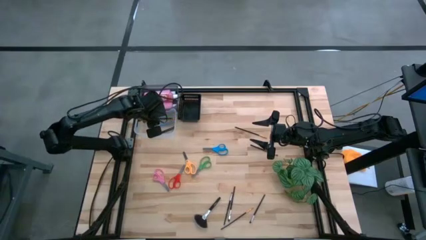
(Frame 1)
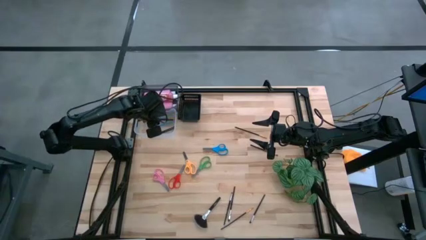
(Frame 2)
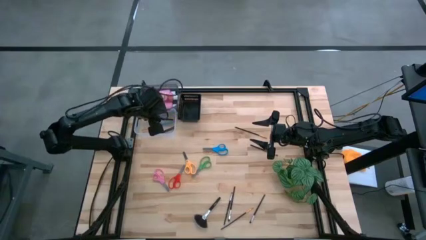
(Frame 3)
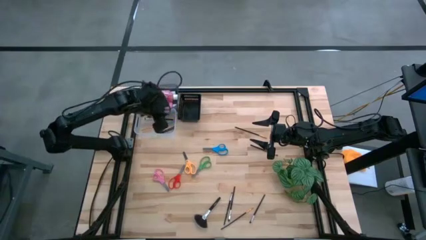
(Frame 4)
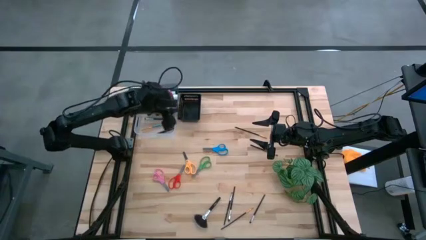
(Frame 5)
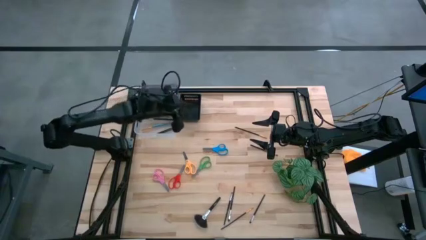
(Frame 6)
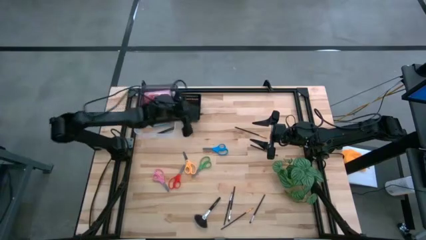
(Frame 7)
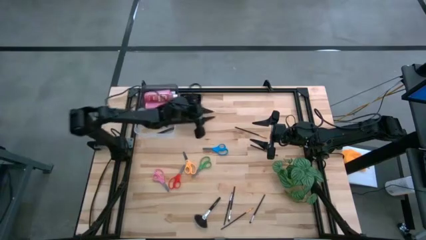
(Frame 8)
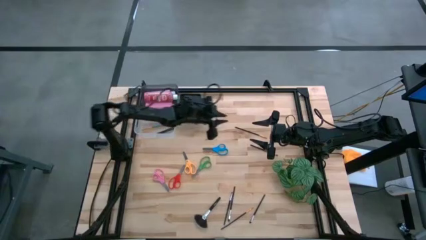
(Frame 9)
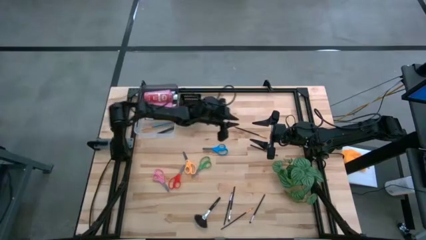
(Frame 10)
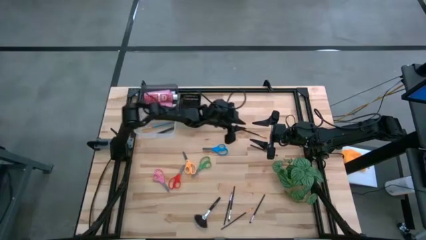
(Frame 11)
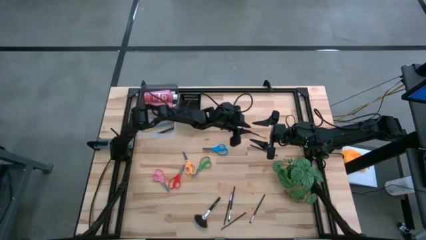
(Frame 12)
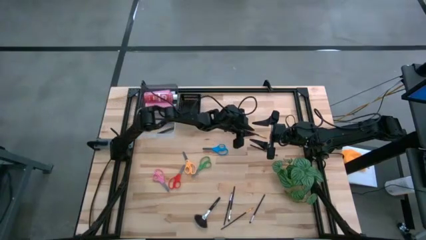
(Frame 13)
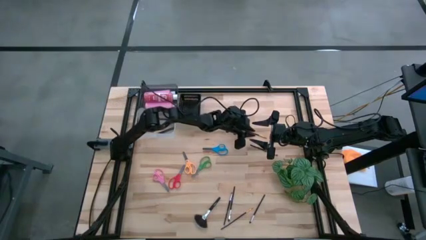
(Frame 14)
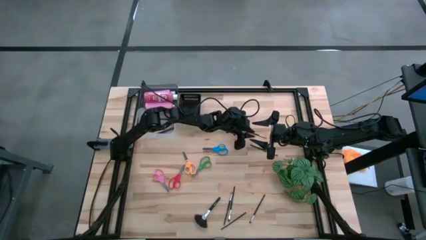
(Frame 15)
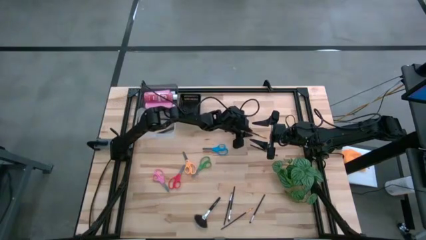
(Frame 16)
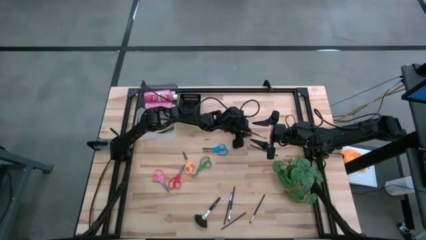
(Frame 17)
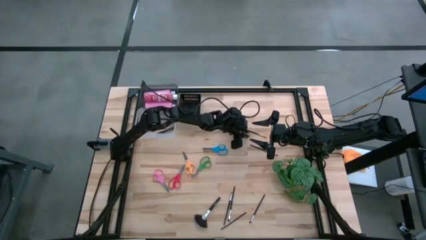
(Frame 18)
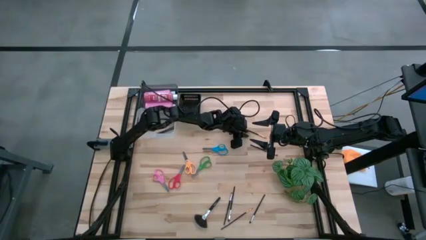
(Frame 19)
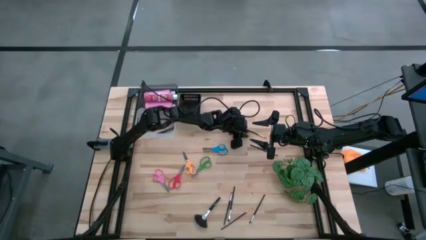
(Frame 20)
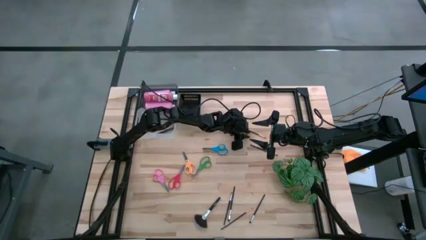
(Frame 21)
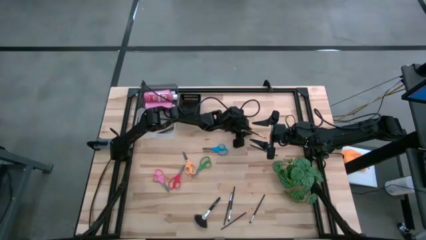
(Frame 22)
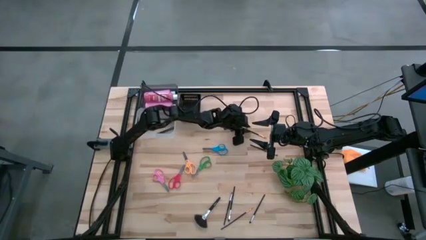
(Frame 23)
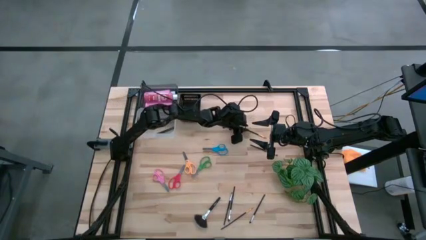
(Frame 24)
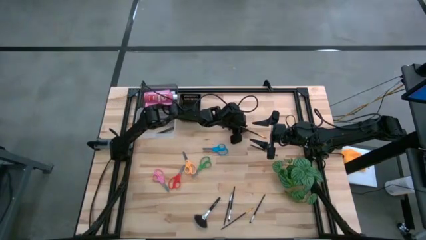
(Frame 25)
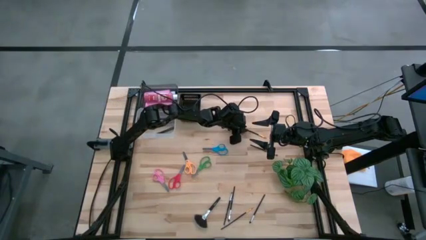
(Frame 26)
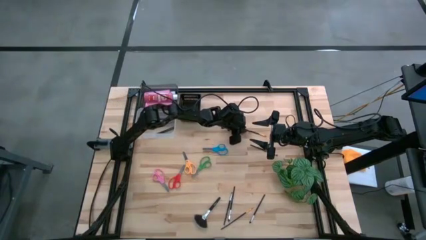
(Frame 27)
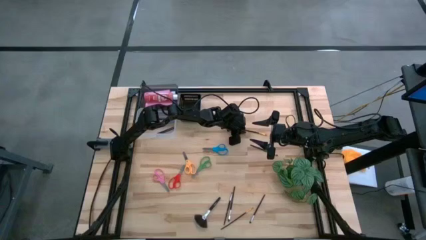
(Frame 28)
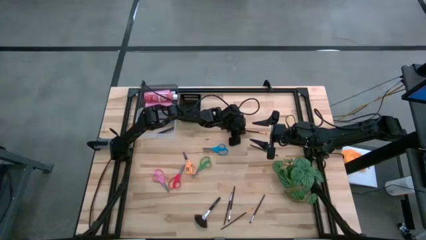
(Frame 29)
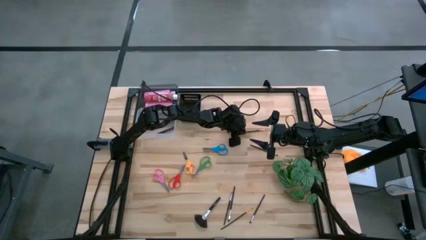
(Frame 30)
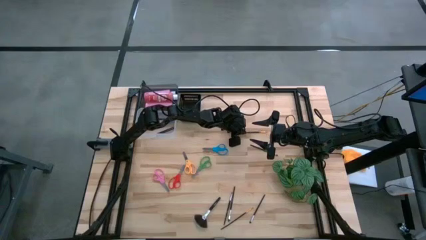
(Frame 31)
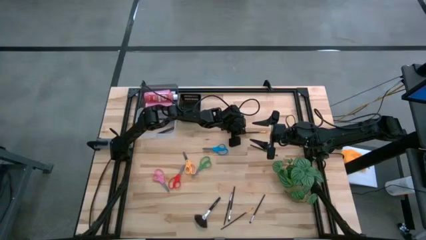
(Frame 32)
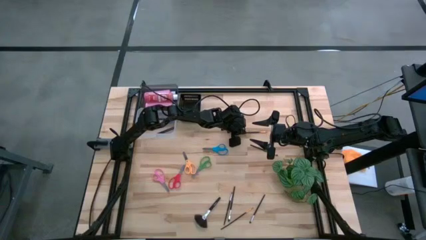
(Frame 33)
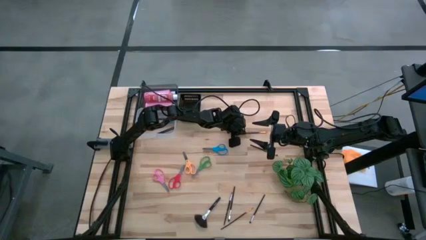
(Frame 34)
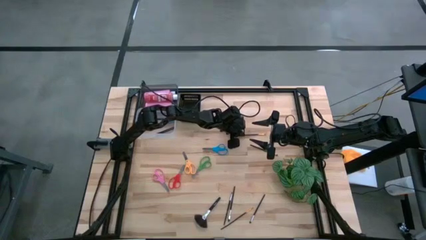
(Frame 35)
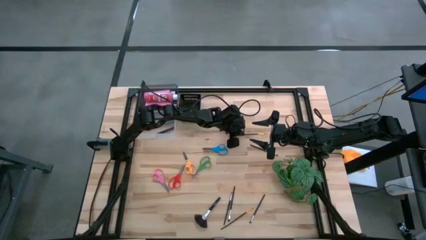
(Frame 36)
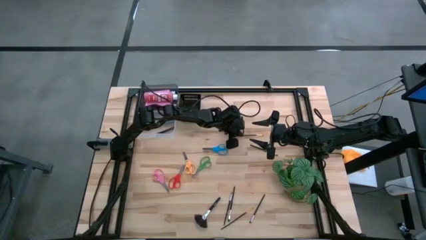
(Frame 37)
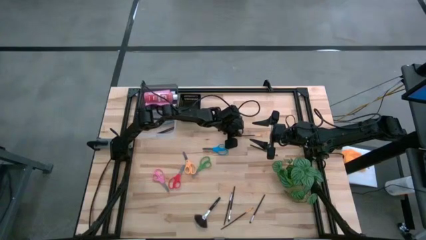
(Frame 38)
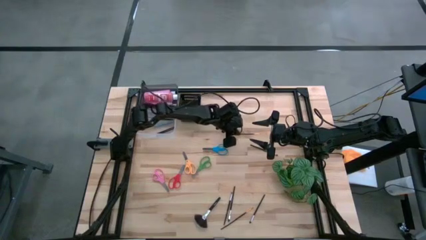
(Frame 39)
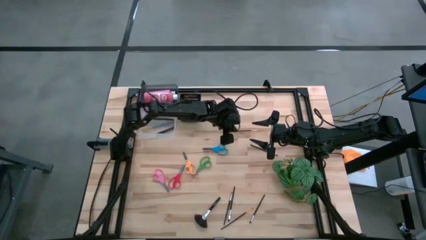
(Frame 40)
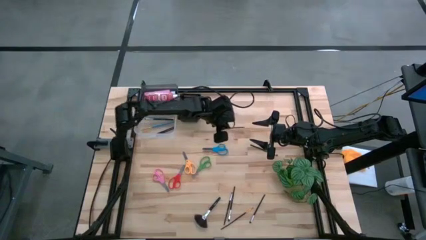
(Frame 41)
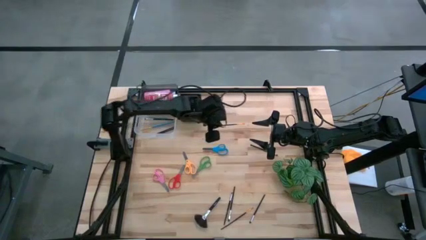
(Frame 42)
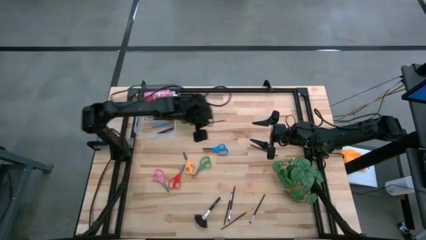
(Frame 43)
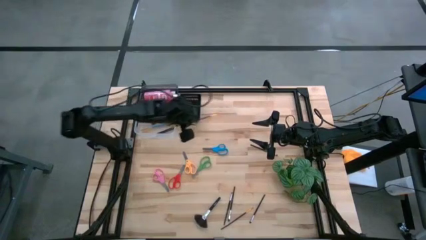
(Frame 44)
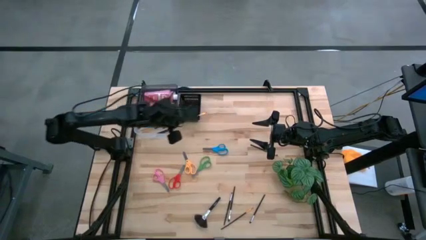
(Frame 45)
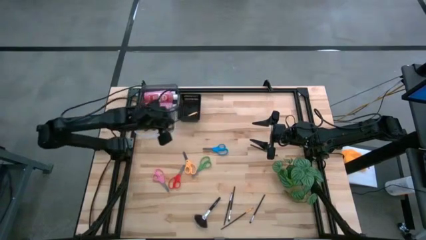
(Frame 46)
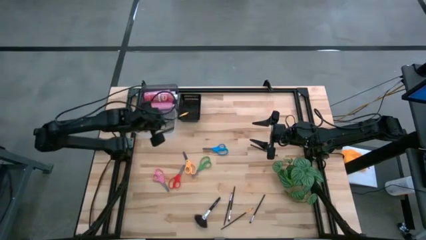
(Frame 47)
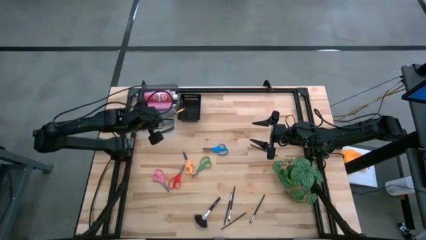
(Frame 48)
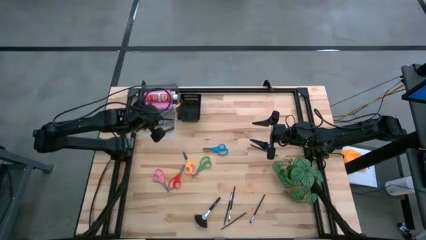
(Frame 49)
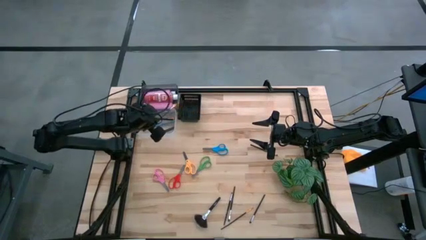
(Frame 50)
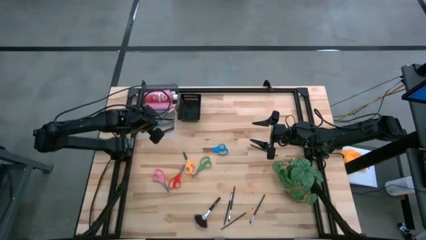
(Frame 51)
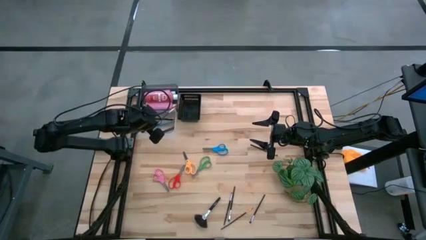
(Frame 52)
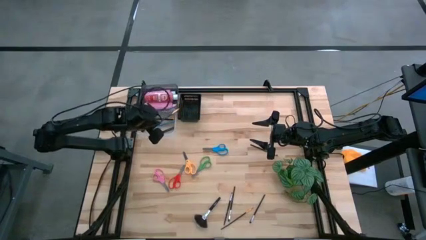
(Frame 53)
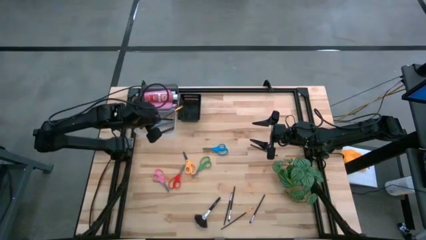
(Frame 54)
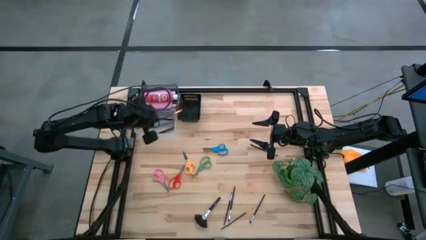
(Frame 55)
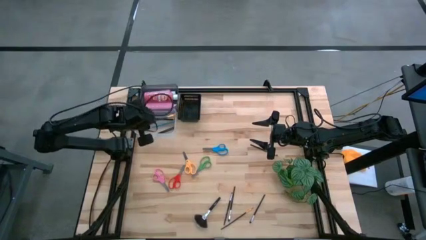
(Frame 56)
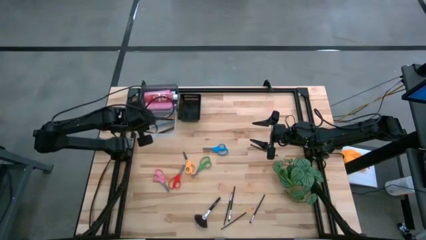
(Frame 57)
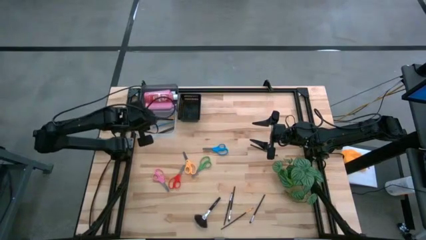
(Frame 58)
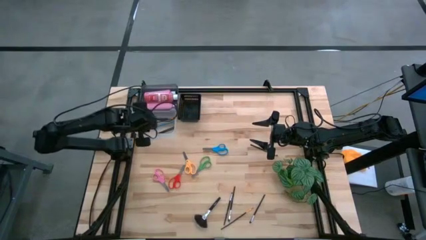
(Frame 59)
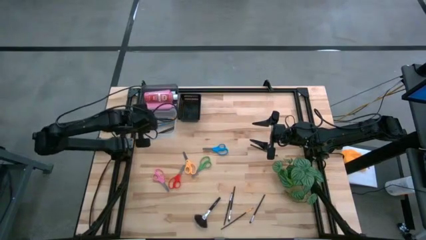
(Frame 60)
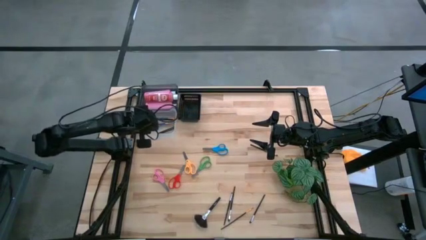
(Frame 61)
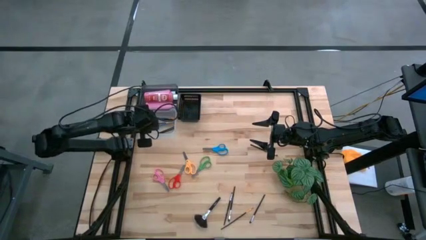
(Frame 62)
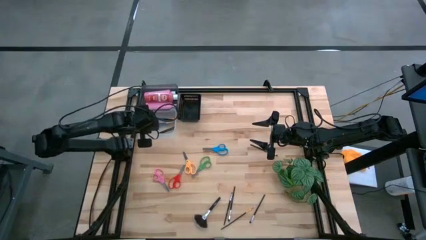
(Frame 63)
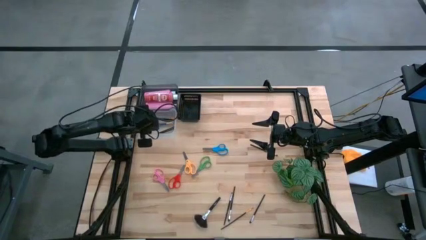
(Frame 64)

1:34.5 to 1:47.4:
Task: Pick & Place Paint Supplies
Put the black paint brush into the transparent bin

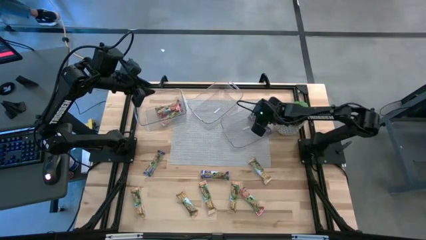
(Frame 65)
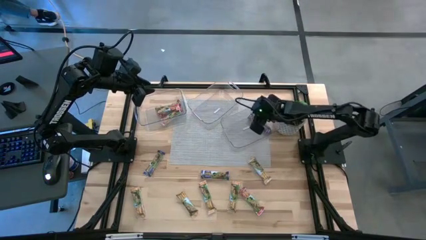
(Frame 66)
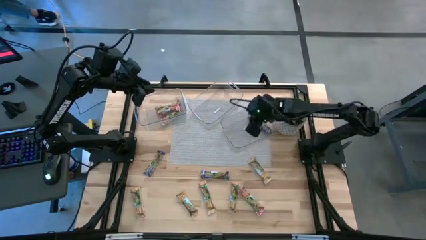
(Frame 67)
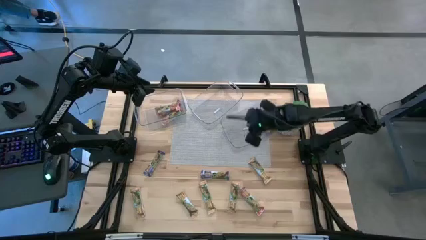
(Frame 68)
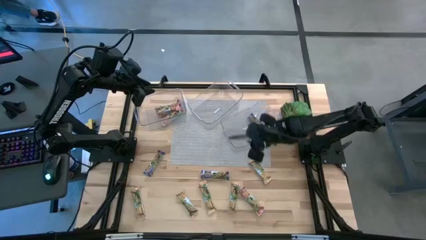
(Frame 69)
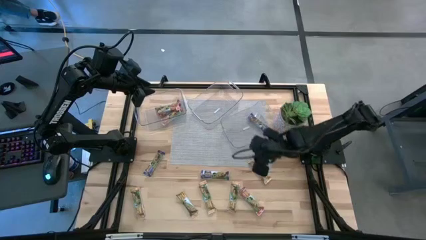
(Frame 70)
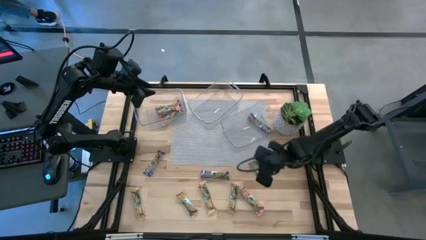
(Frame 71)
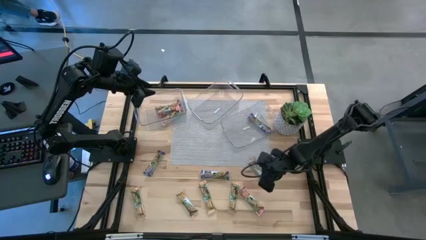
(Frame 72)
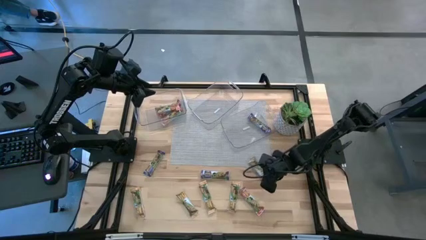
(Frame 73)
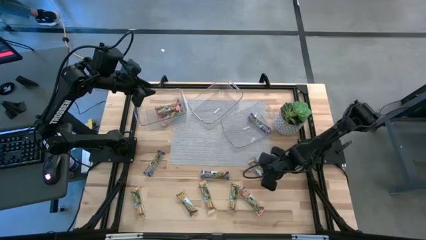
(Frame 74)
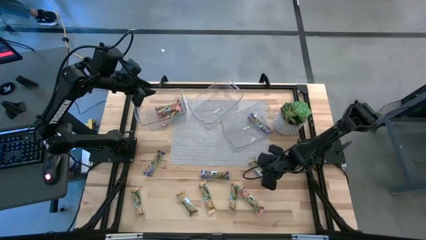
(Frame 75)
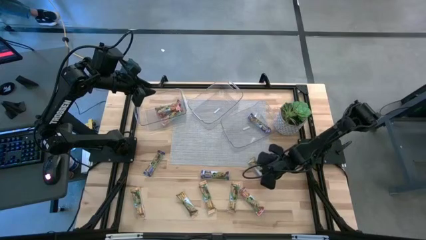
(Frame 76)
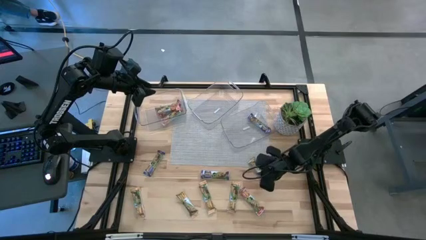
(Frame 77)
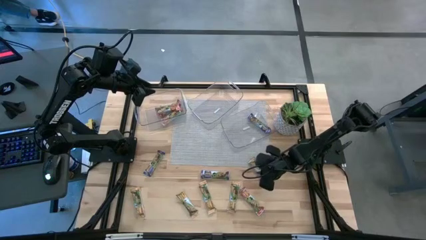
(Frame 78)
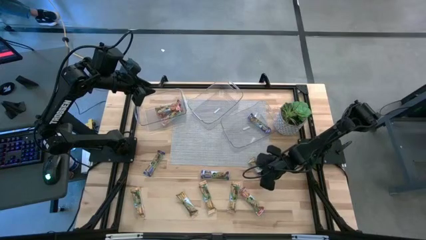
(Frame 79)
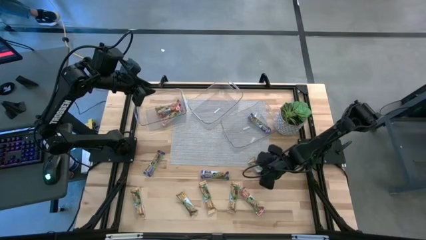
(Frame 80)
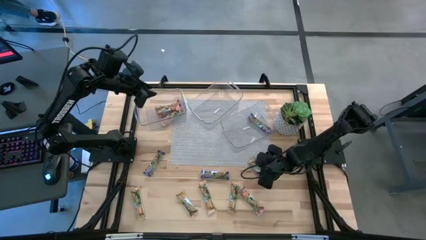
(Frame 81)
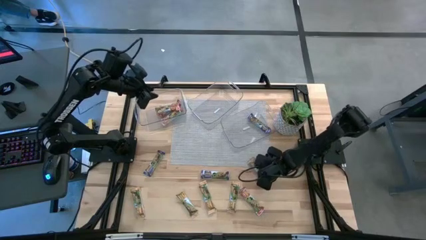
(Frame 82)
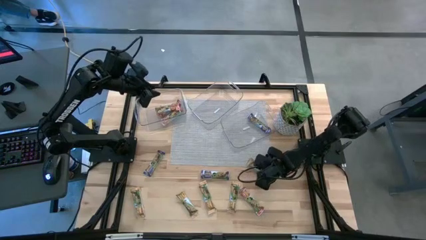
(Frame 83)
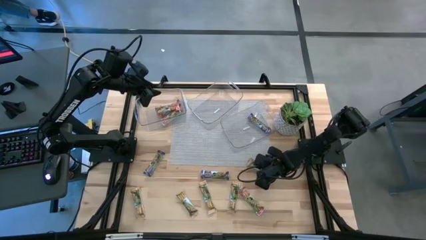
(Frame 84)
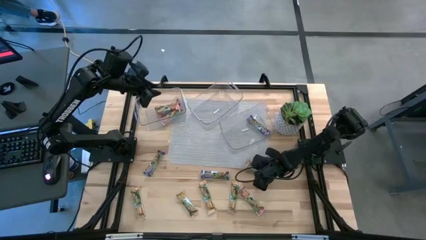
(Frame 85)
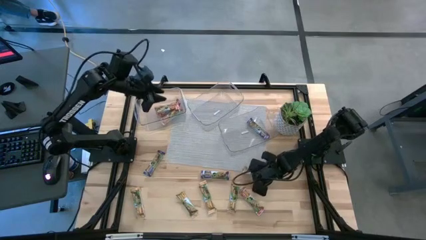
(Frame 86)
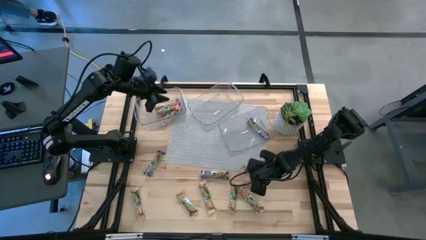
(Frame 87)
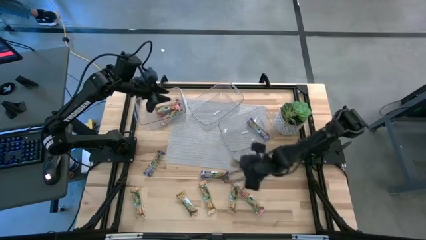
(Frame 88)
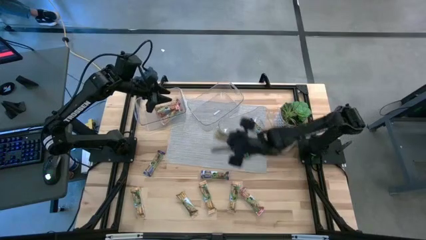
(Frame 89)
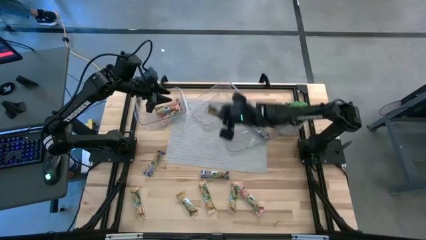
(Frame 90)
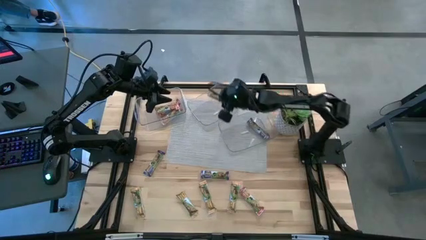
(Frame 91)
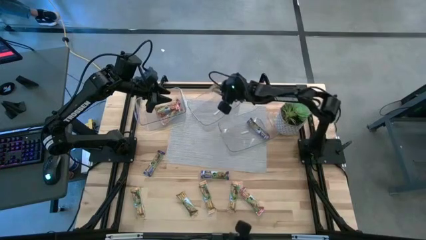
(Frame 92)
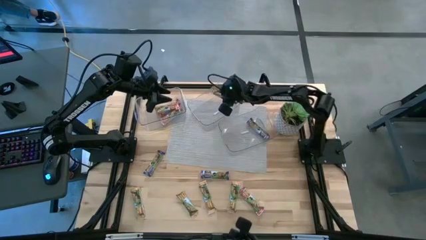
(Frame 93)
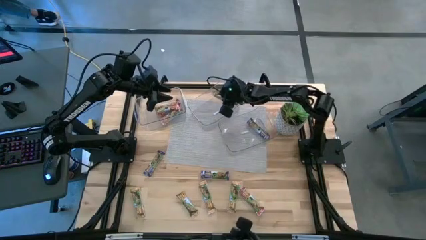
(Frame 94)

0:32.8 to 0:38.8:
Task: Pick and place Granola Bars by type
Put the orange granola bar into the middle transparent bin
